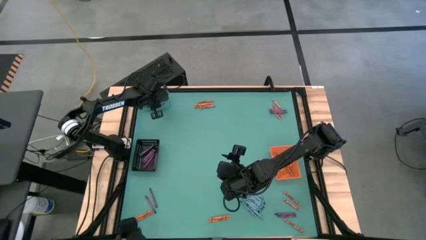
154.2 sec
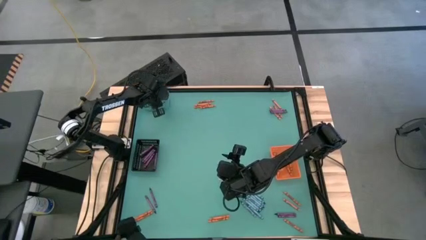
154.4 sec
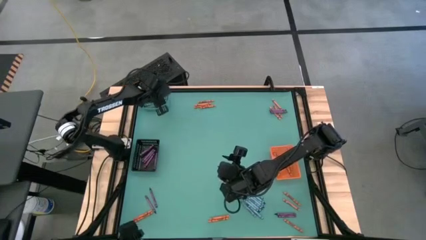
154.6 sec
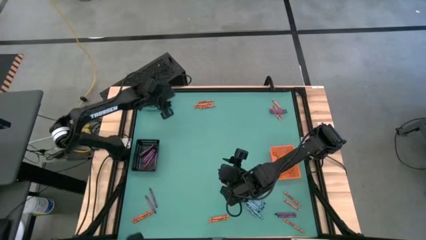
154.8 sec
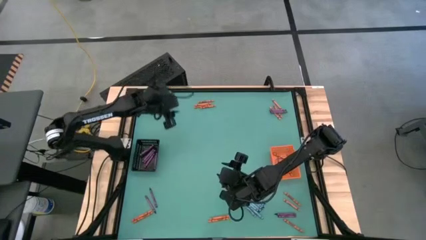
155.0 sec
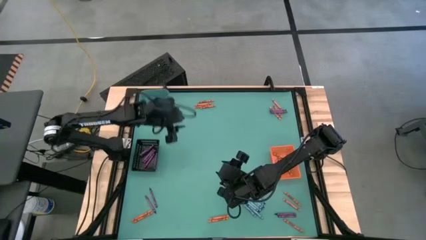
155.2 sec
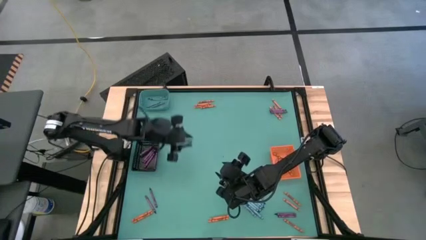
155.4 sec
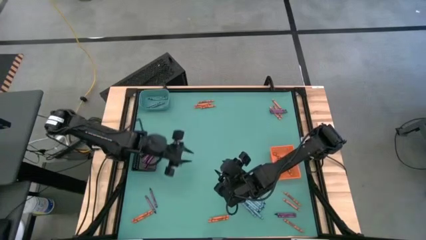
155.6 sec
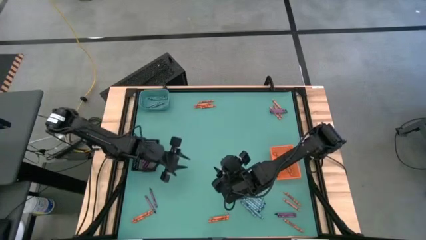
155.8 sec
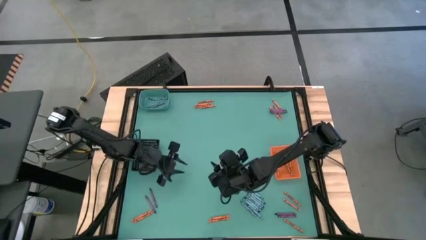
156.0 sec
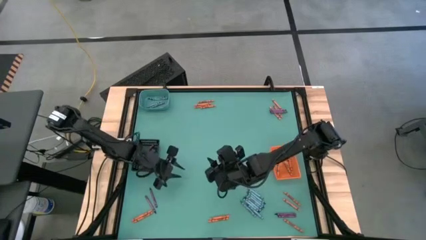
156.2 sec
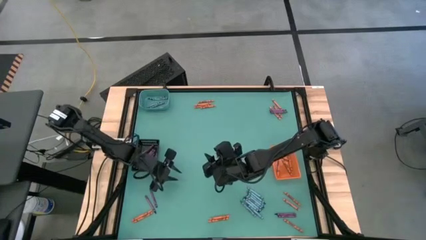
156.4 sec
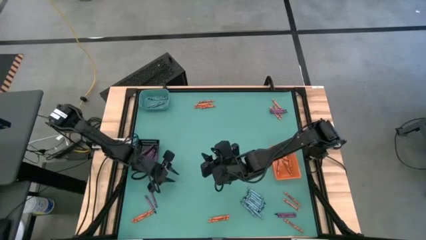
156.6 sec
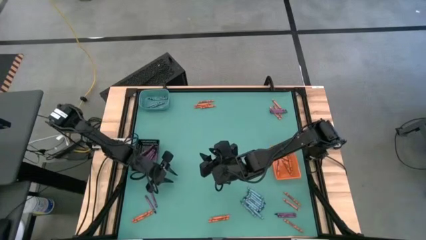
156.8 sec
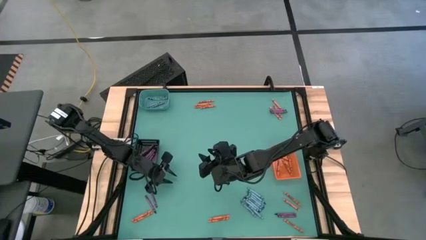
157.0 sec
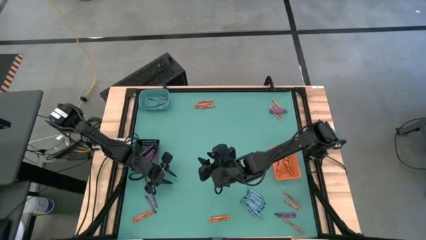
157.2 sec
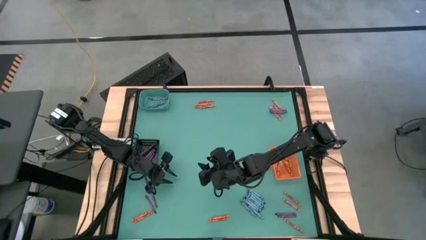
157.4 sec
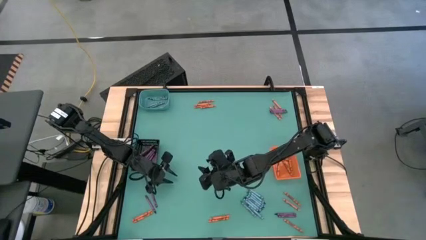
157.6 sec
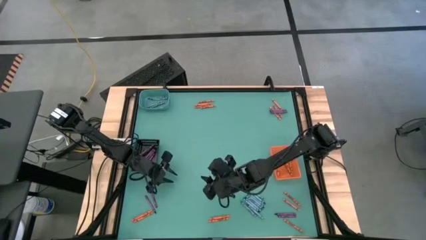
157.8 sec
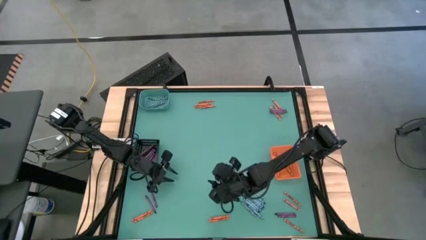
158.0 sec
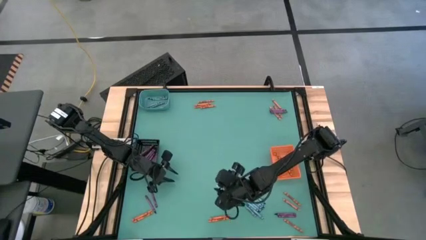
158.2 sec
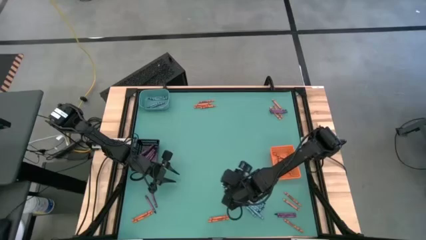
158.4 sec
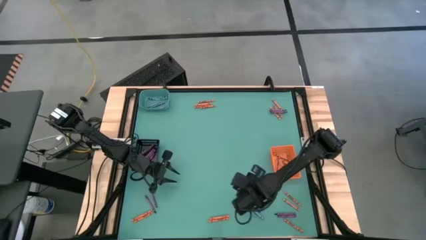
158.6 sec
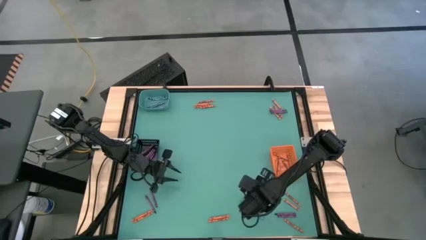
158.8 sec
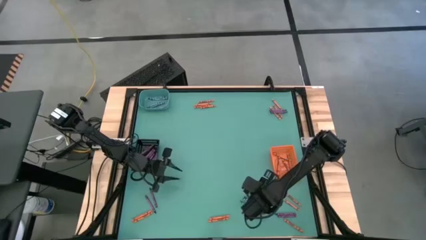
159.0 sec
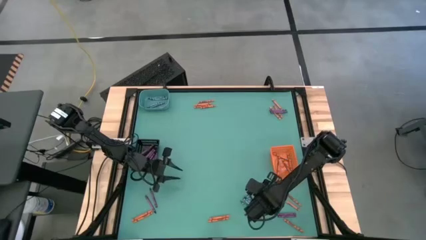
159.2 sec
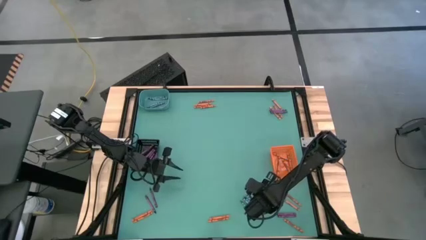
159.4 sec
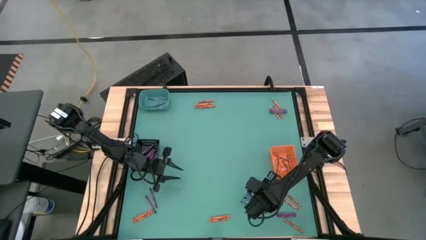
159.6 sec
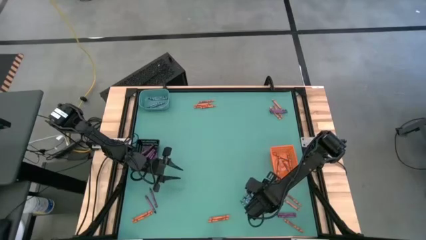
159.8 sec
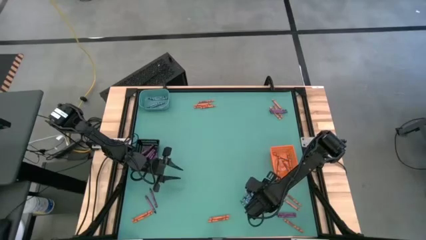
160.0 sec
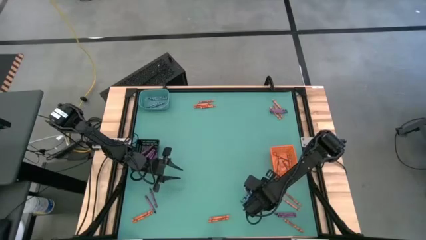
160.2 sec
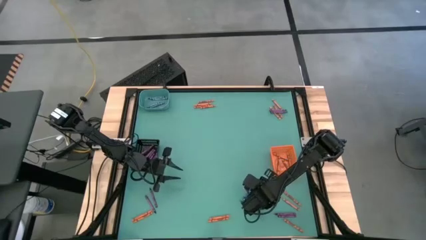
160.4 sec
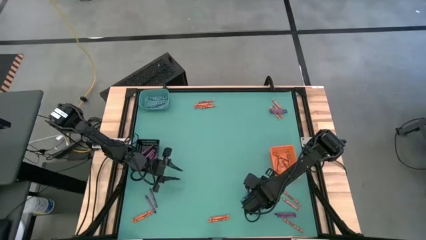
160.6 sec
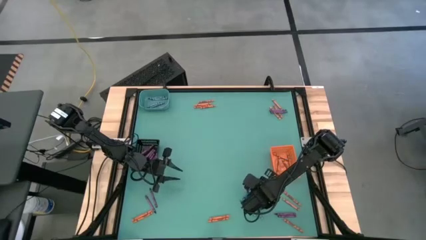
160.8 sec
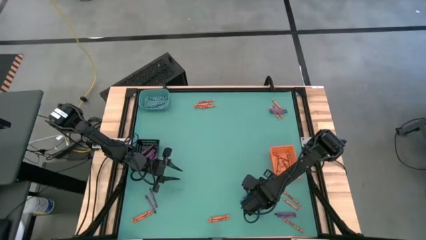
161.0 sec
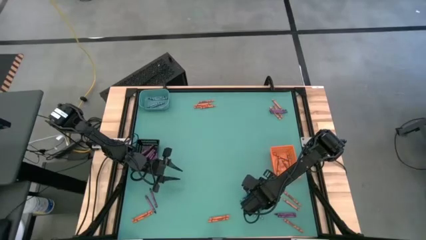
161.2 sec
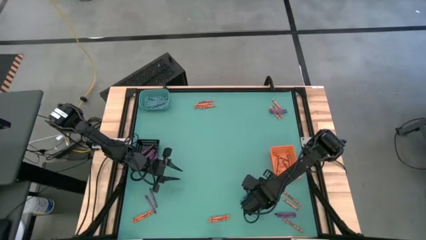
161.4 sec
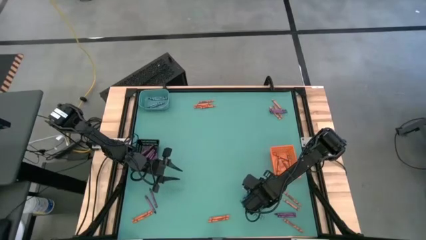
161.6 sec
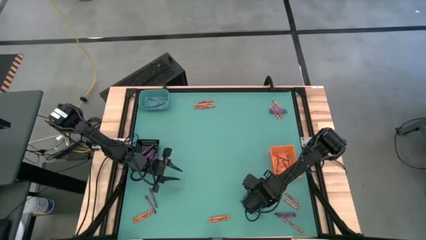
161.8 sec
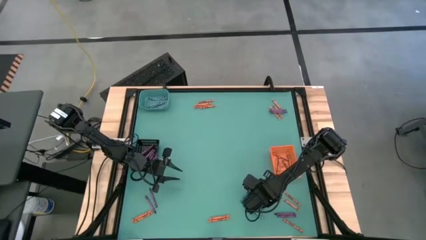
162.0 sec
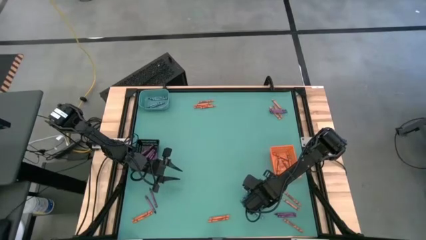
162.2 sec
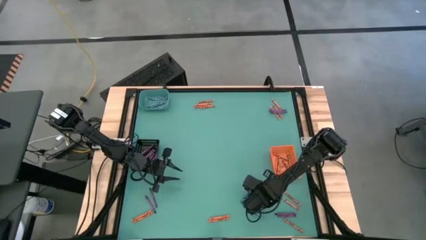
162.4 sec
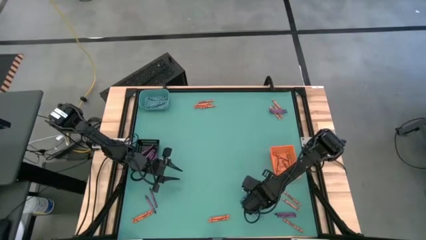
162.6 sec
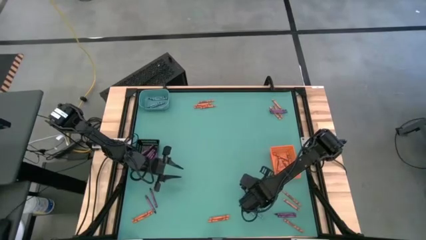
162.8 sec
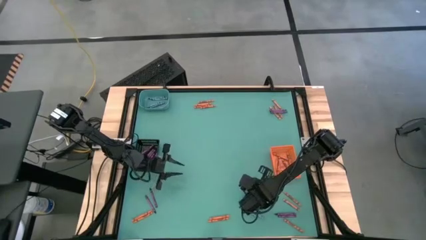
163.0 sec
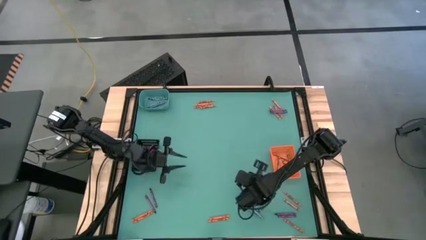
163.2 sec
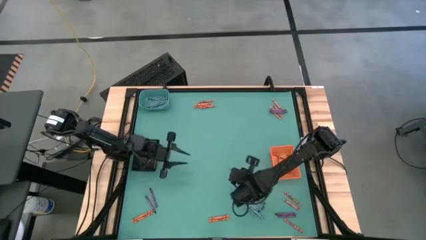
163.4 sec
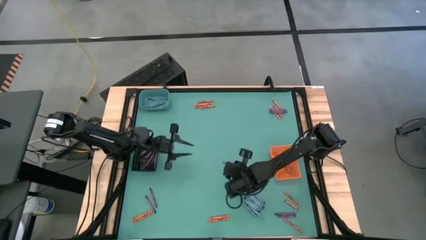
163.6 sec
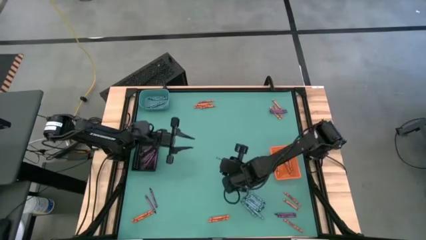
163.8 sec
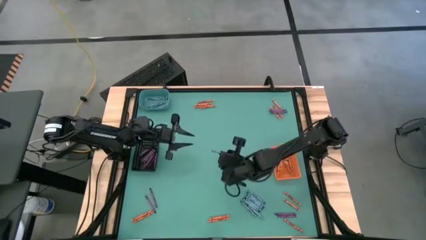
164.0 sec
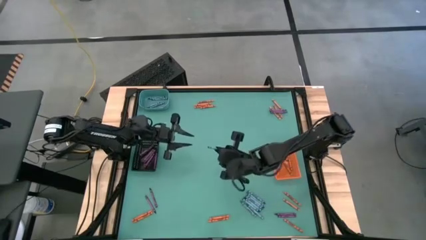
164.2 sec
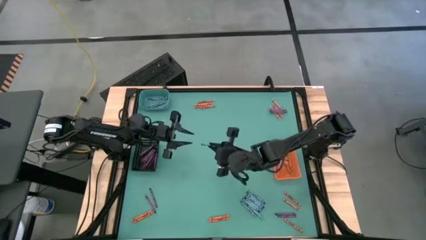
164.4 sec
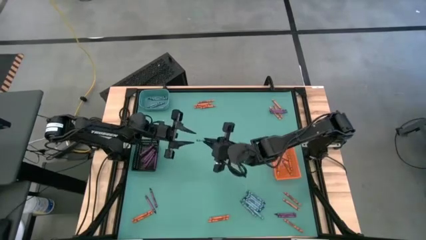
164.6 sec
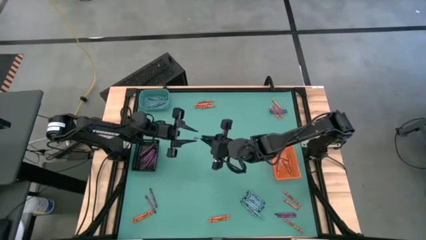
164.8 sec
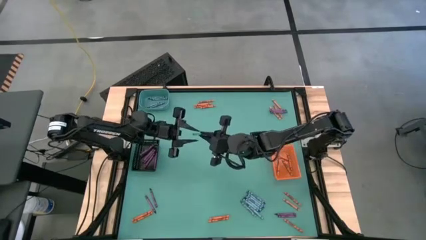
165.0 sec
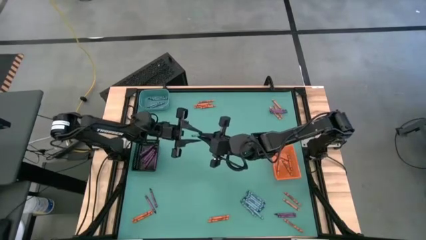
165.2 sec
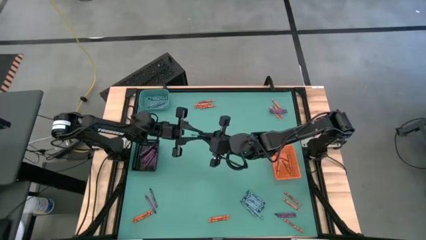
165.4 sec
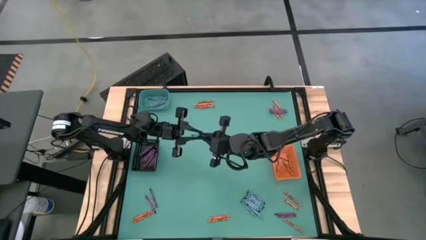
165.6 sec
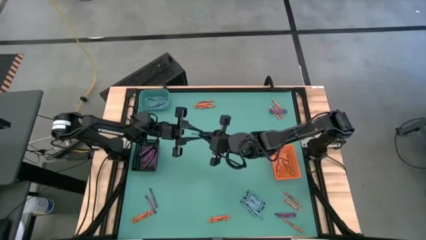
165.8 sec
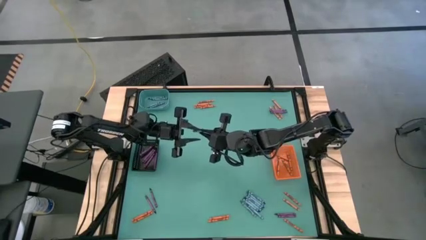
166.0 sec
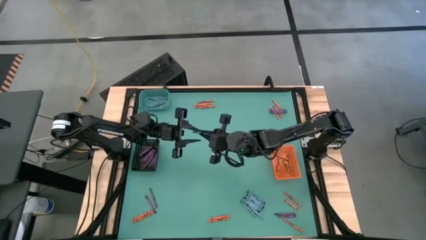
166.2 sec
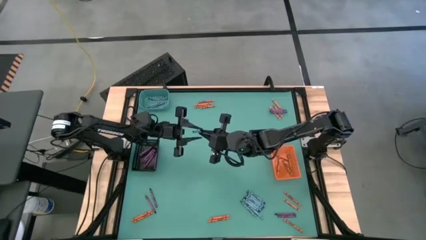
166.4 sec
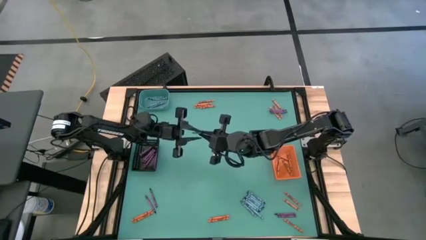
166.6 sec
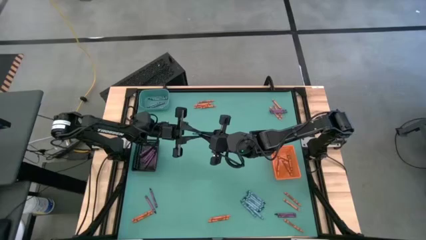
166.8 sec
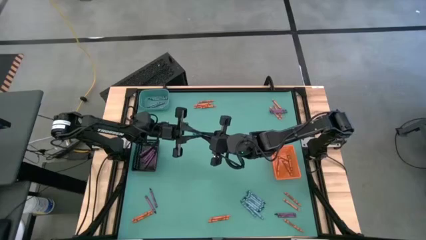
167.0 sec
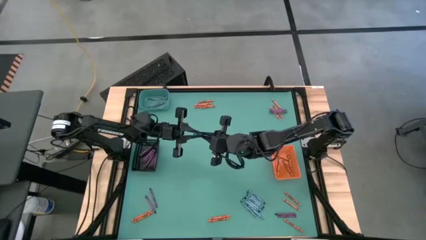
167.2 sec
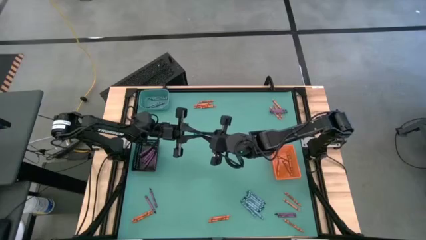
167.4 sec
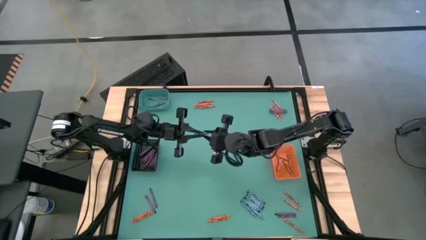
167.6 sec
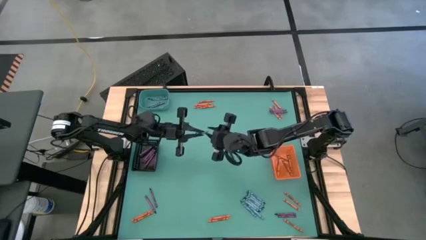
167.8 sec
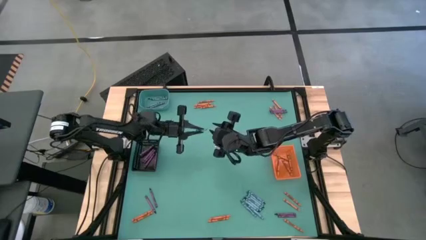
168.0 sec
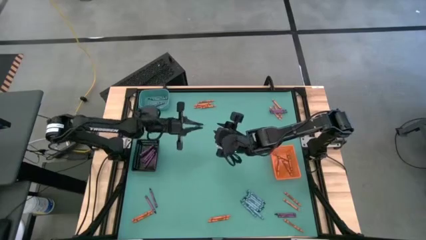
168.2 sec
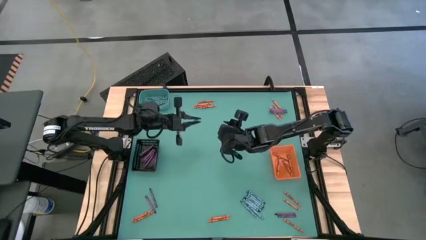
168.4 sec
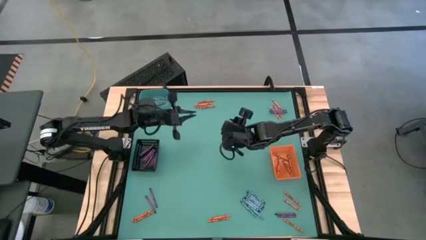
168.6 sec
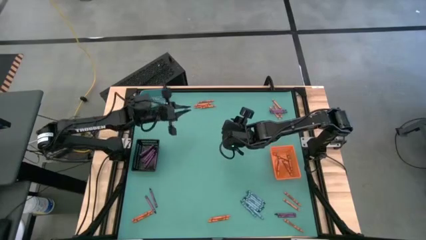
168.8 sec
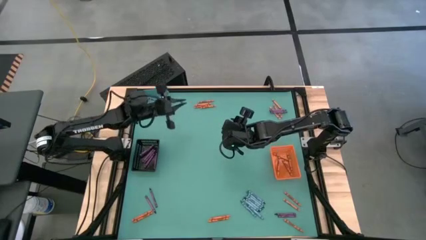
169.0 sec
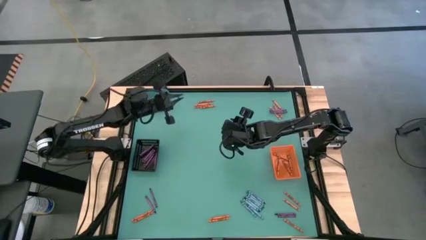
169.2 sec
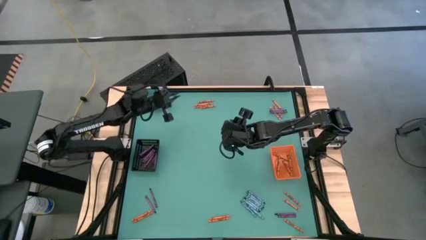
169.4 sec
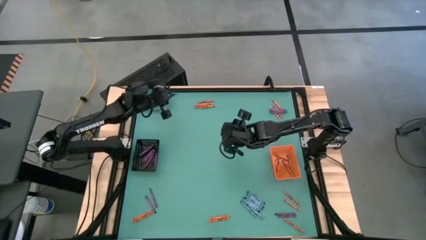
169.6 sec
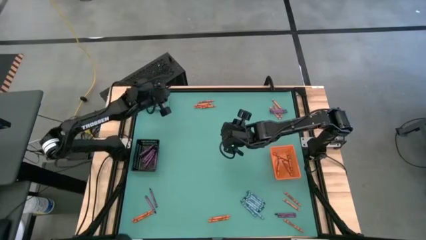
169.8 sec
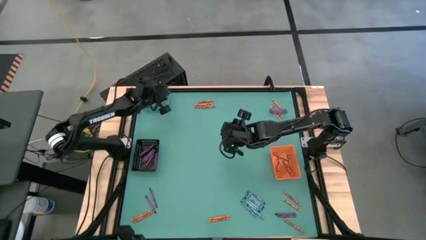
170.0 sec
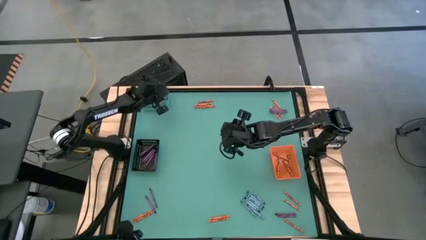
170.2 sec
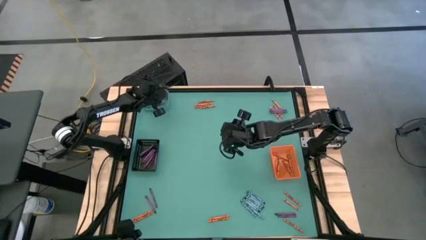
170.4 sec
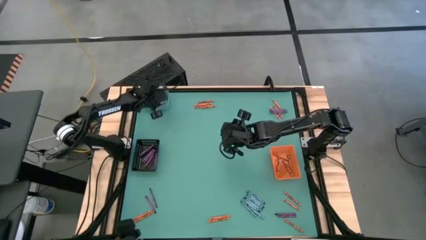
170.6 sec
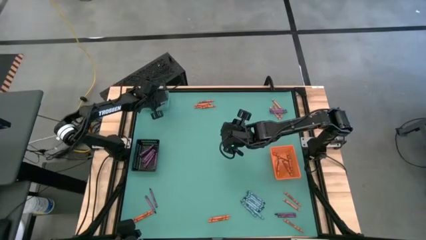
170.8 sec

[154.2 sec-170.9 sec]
Task: Sort crayons
Put the green crayon into the green bin
